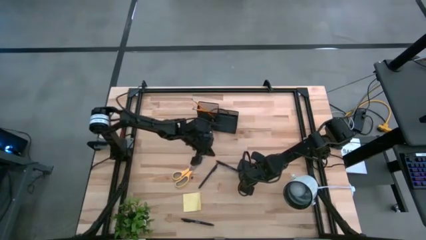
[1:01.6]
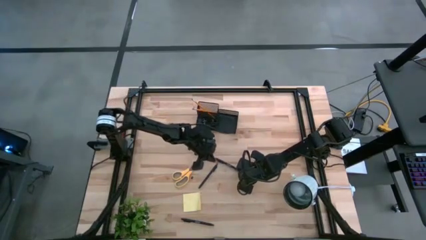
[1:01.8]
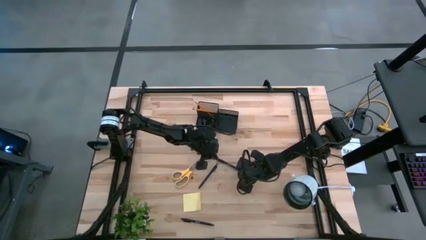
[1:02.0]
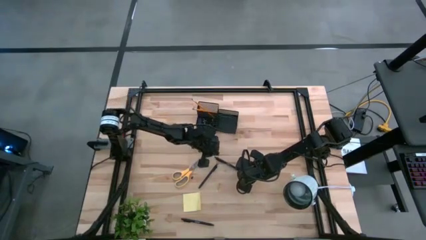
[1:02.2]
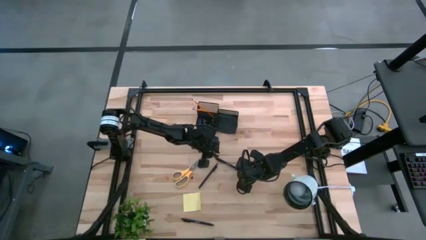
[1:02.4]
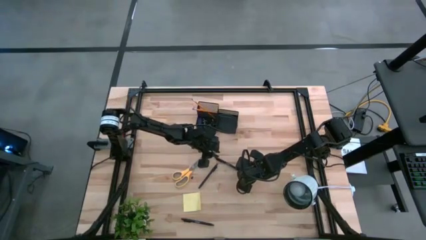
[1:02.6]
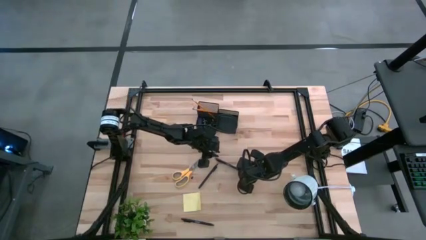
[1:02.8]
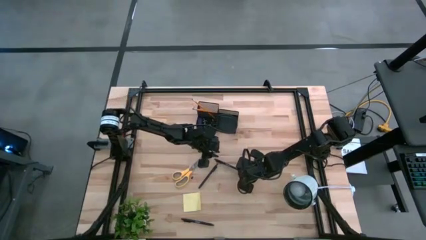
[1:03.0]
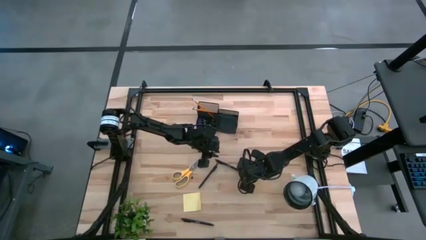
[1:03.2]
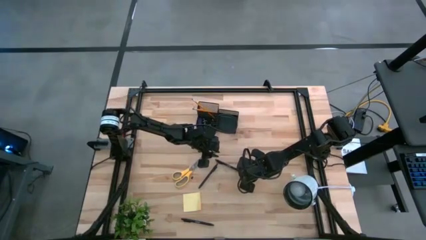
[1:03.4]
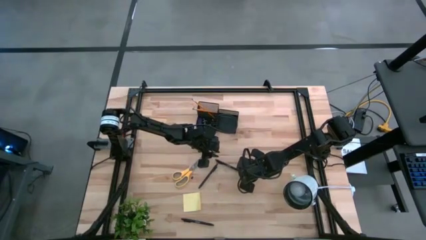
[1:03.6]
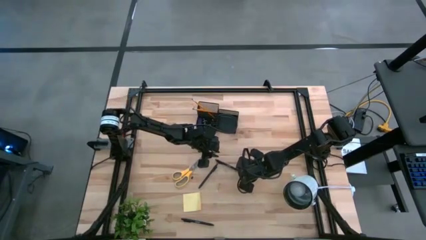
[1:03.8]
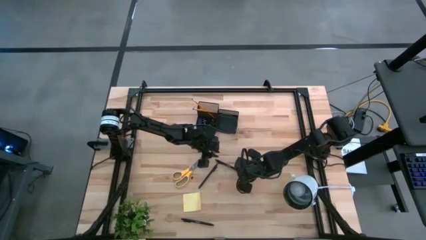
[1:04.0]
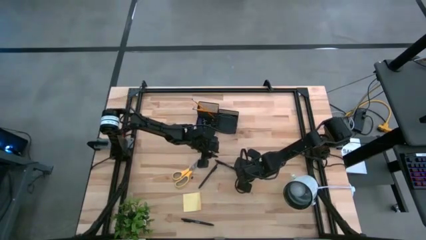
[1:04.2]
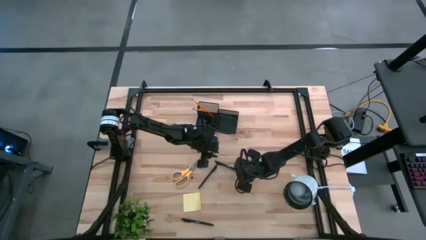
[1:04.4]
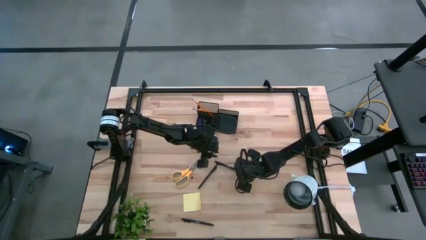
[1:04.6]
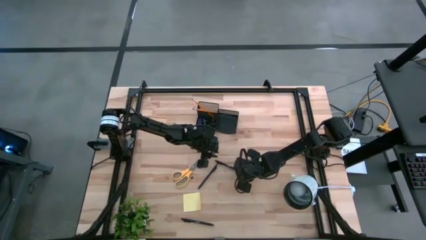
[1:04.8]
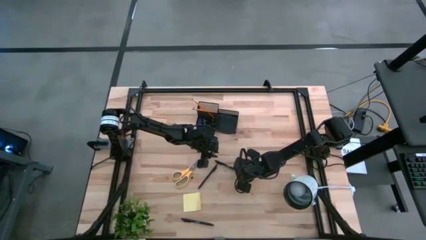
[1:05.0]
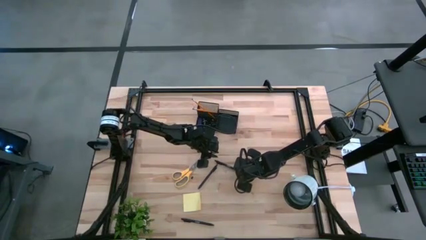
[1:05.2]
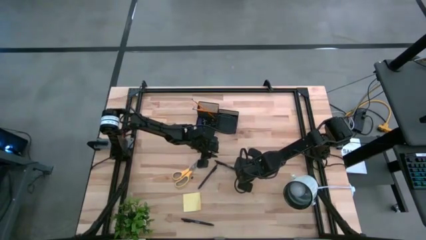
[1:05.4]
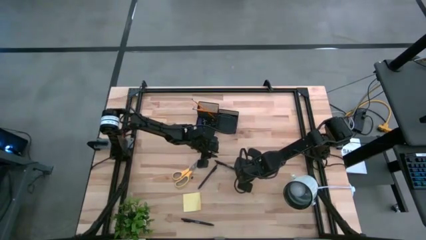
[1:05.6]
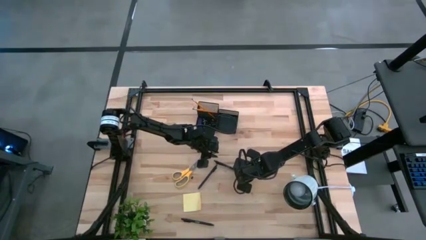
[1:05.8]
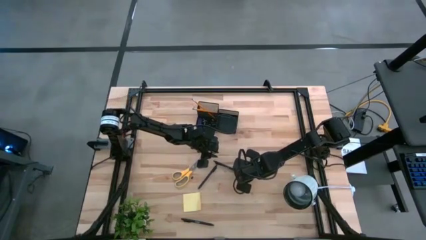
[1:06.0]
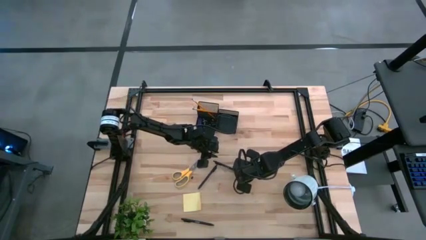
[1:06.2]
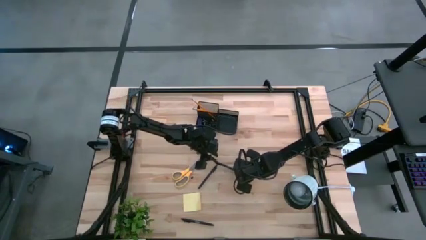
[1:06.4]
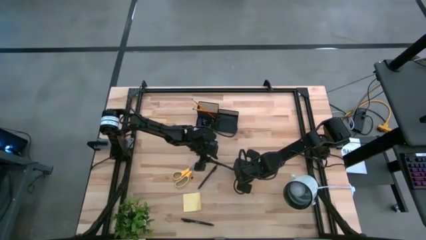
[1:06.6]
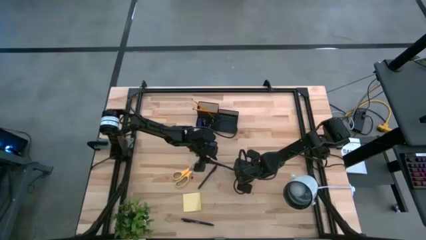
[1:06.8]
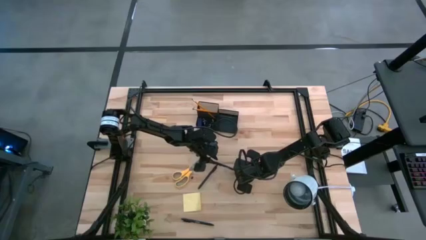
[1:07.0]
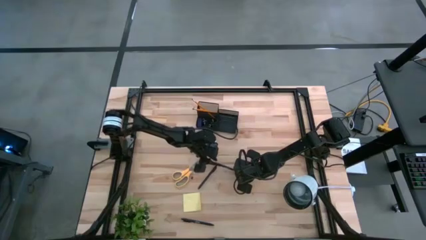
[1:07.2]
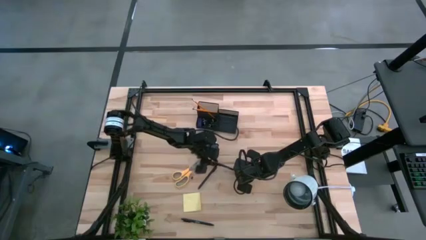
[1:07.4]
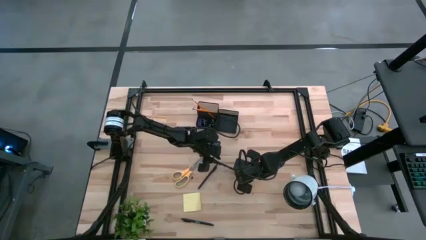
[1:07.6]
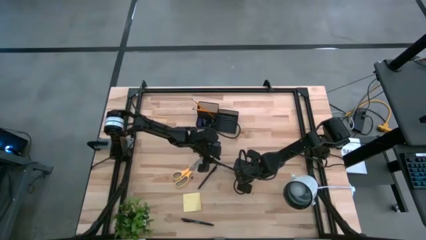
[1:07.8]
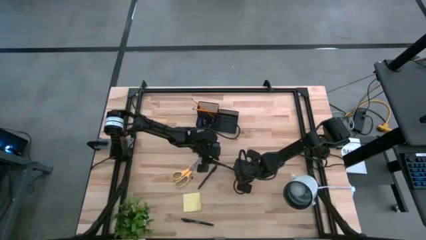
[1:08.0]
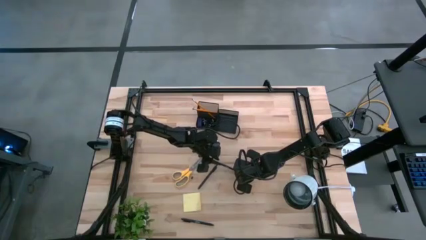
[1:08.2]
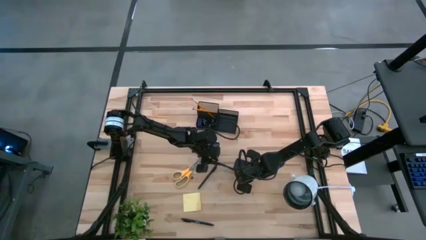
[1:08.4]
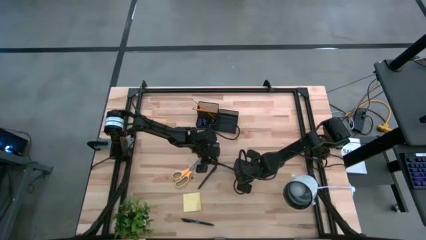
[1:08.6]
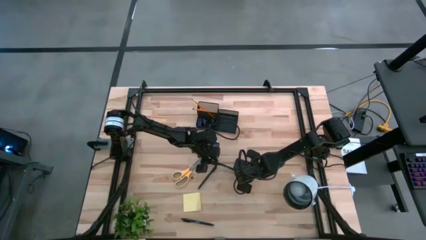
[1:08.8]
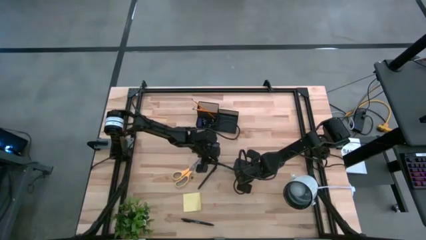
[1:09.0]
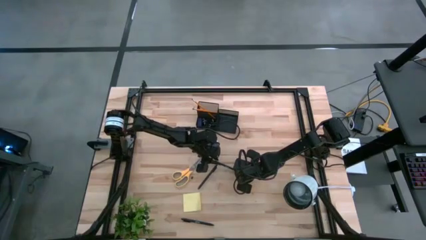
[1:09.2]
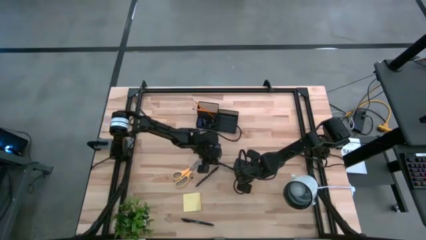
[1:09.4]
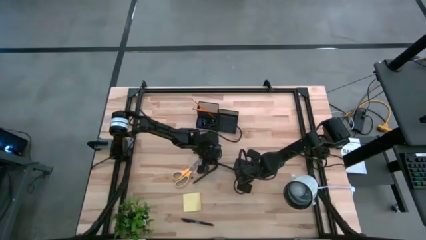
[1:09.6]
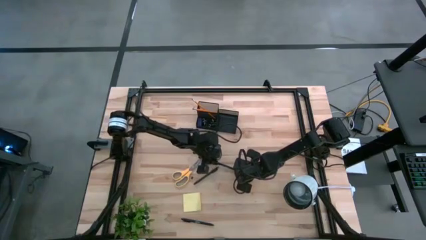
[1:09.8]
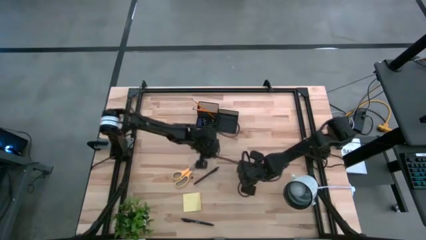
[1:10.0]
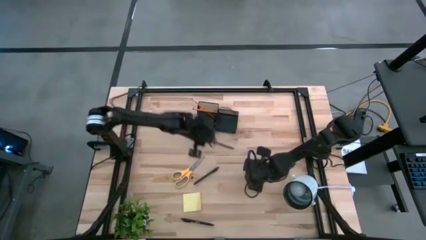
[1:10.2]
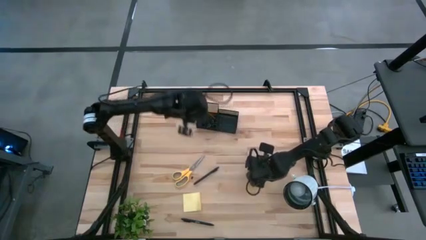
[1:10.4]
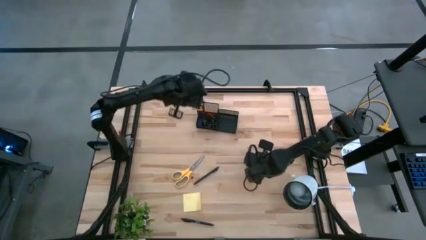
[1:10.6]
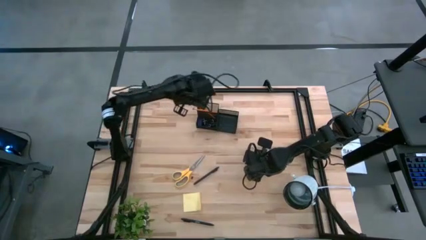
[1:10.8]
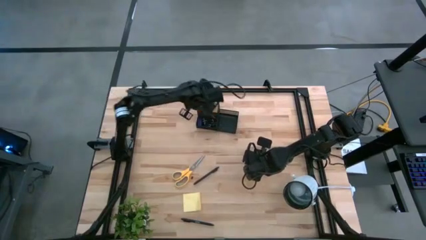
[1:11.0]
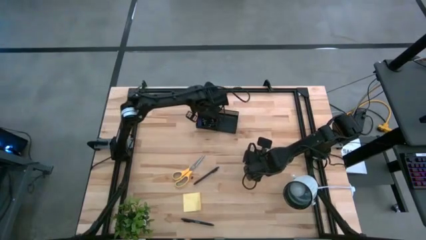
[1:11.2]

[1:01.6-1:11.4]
Task: Pick and place office supplies into organizer
Put the top black pen into the desk organizer

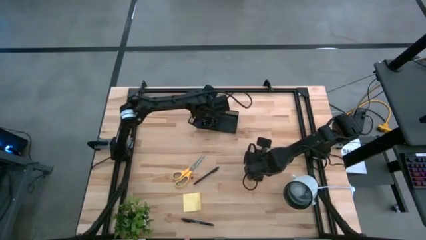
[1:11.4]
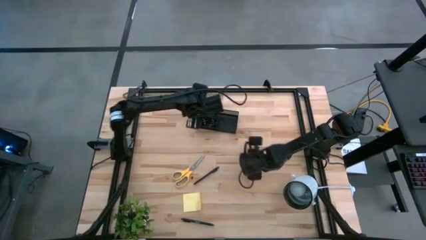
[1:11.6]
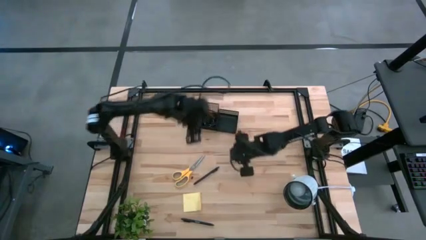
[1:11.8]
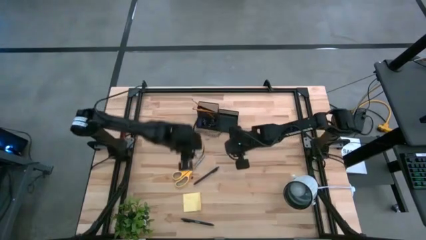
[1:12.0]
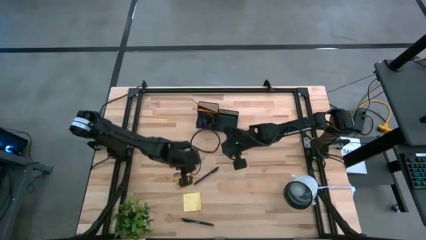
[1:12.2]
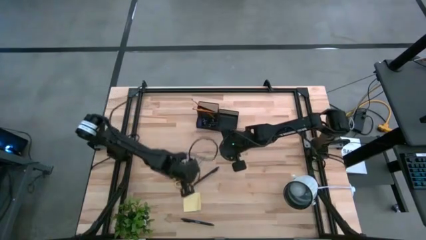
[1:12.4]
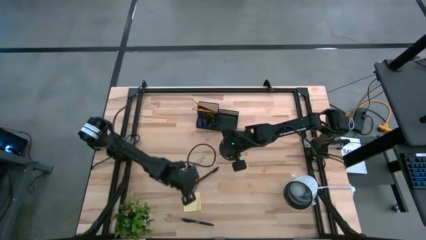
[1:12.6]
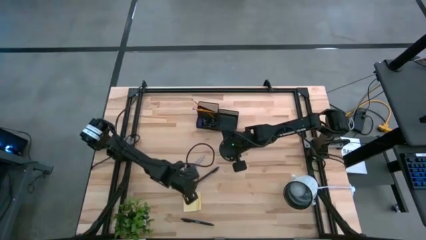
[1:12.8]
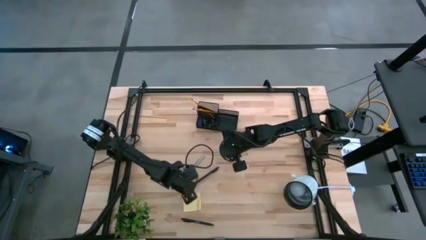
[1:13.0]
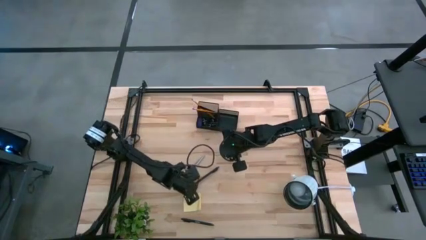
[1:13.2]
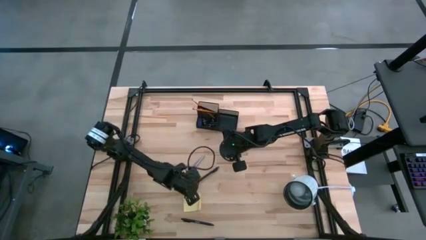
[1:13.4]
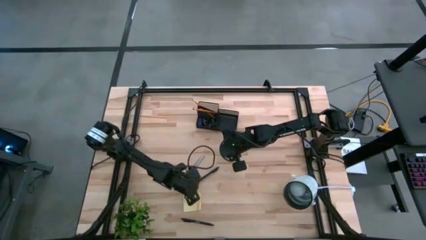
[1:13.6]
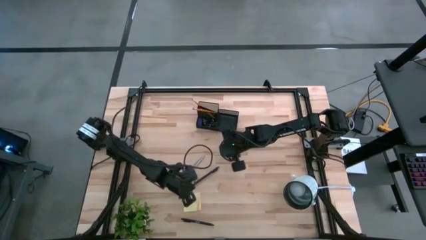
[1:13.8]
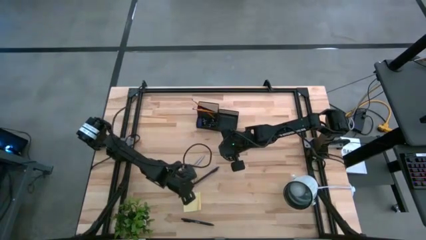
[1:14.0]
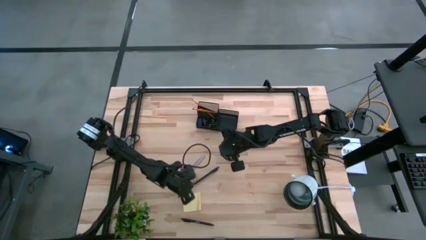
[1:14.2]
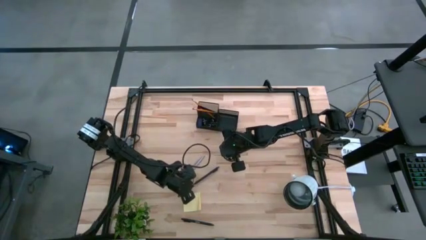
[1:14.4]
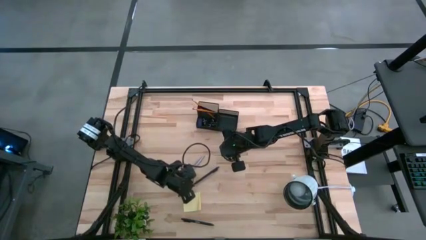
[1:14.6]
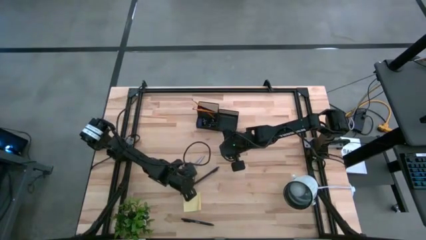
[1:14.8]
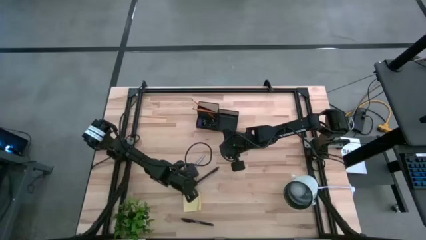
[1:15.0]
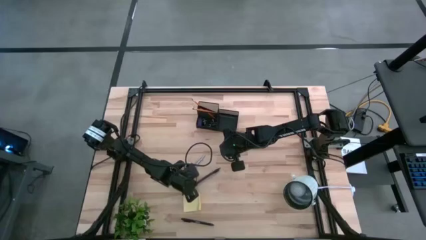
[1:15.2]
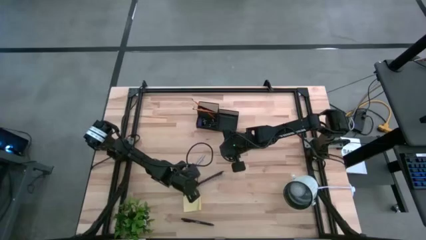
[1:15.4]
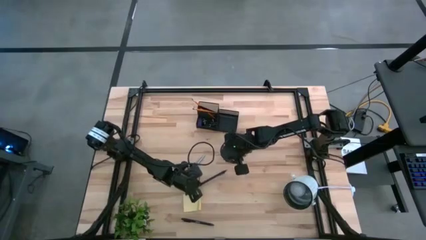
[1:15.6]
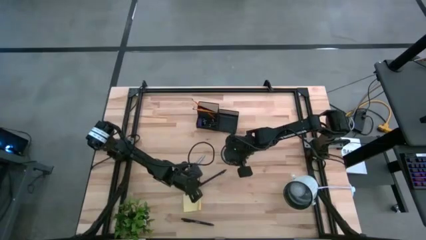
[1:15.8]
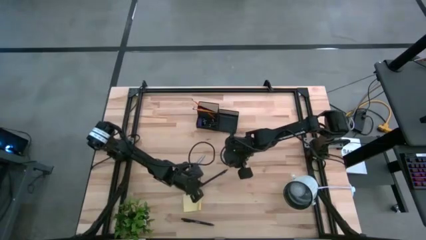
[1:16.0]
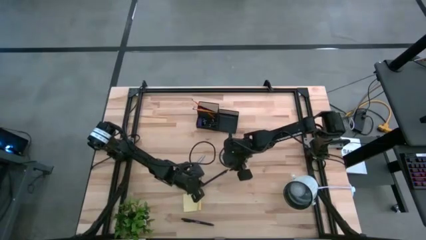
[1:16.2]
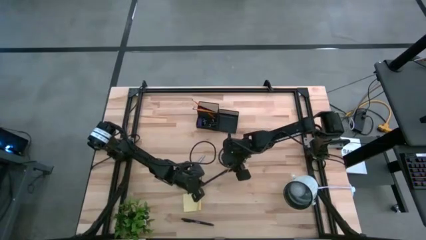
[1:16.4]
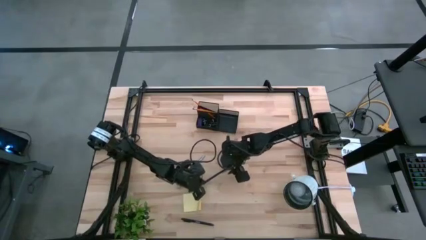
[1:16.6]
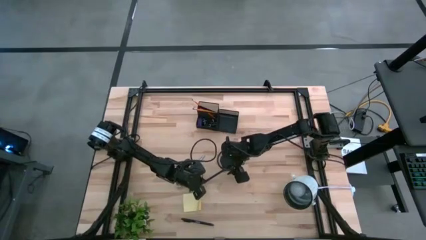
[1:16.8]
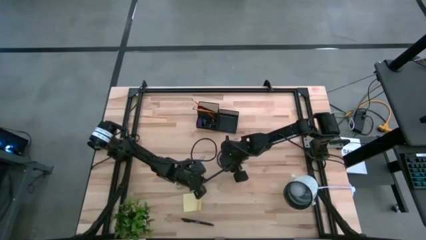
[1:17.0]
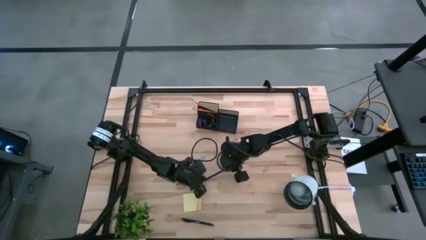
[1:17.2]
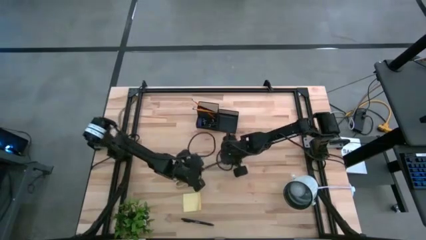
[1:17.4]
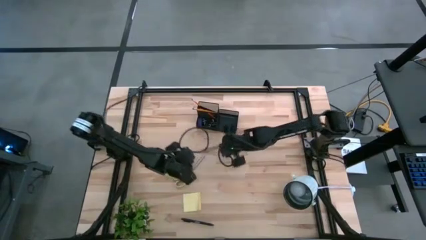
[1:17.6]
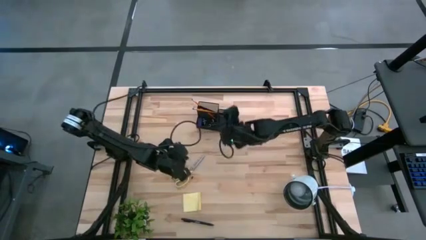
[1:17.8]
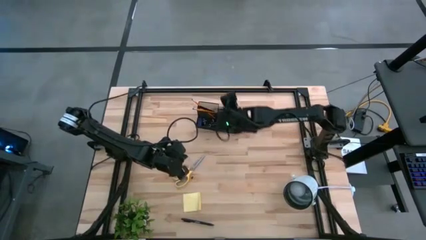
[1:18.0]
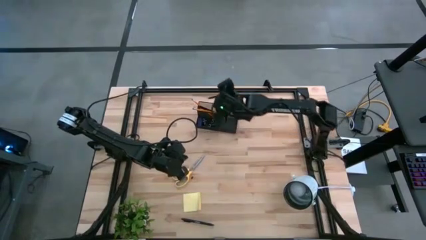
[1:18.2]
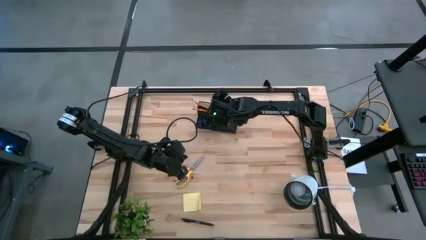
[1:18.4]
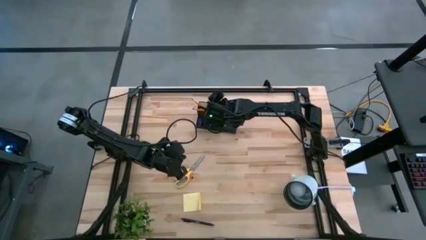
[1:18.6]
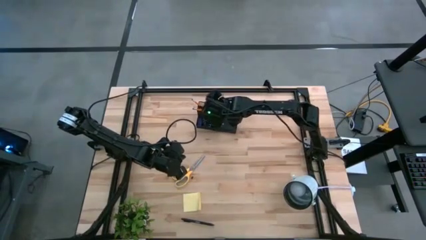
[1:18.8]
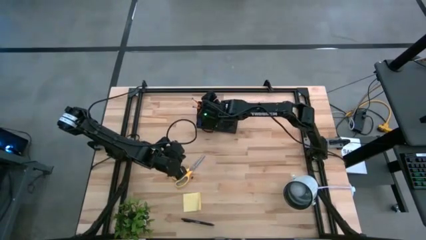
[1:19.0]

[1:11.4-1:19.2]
Put the top black pen into the desk organizer
